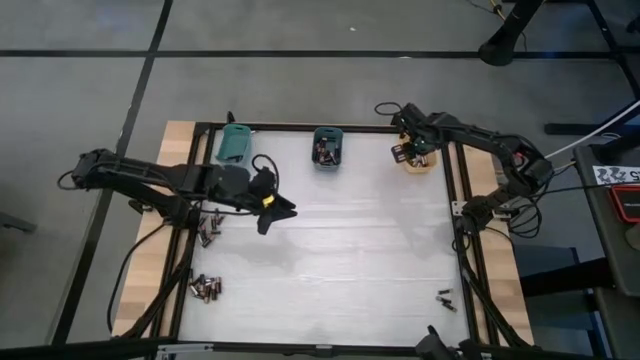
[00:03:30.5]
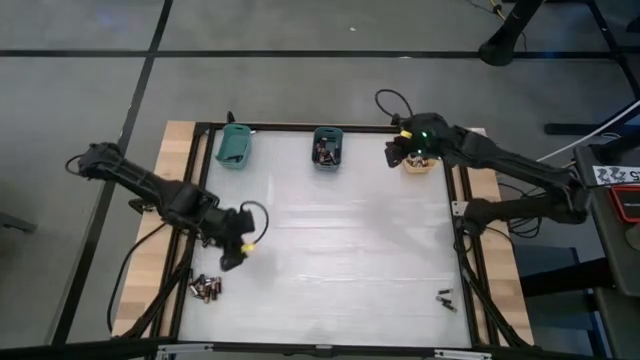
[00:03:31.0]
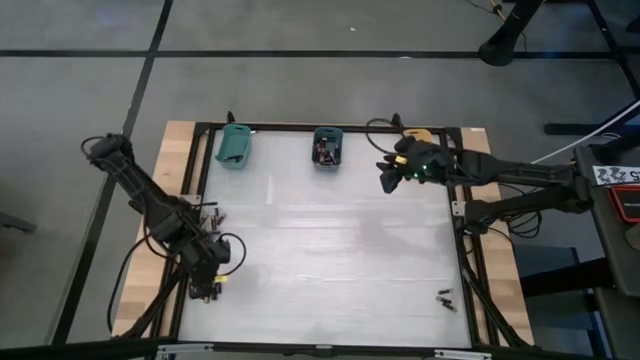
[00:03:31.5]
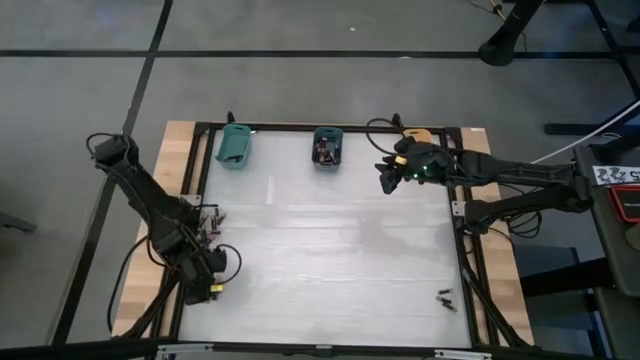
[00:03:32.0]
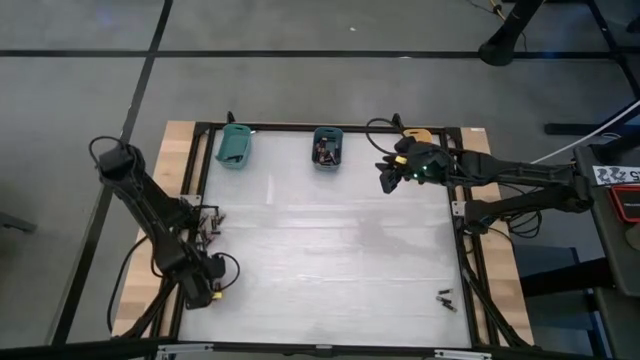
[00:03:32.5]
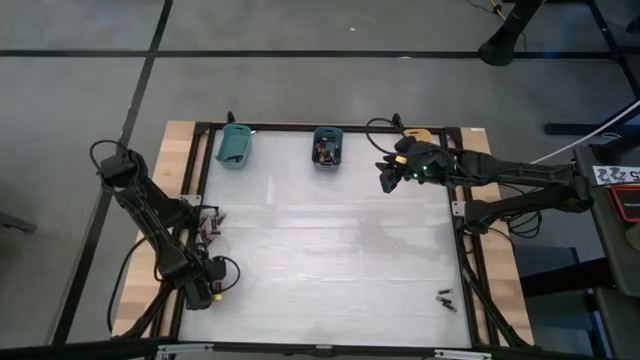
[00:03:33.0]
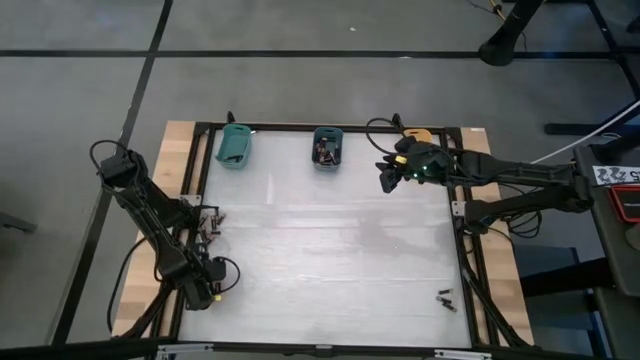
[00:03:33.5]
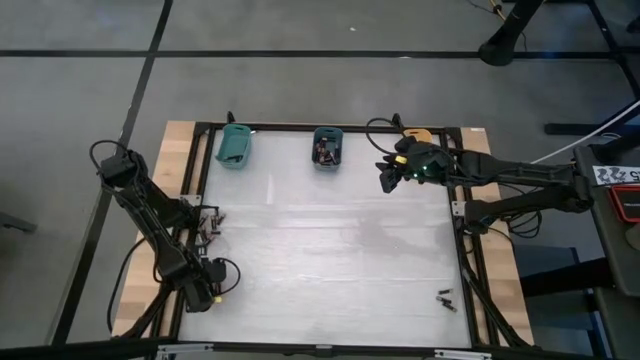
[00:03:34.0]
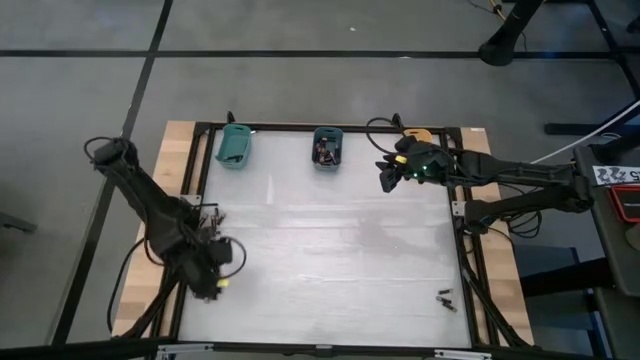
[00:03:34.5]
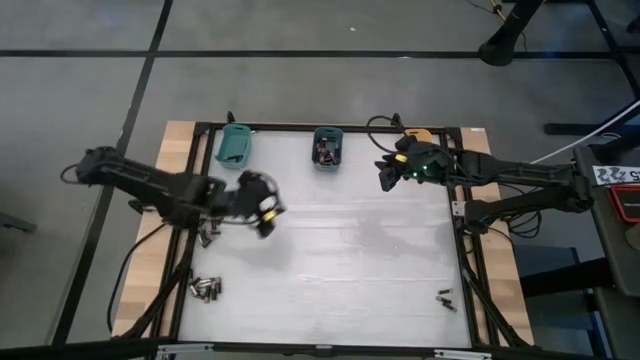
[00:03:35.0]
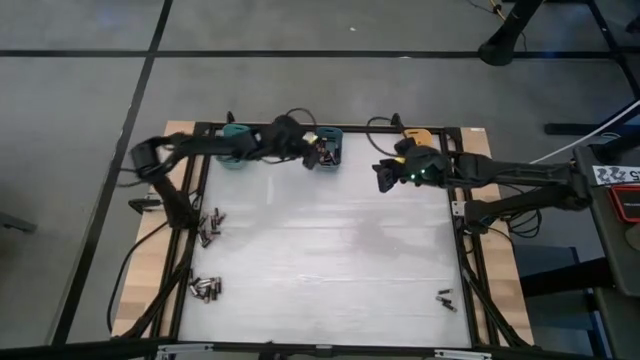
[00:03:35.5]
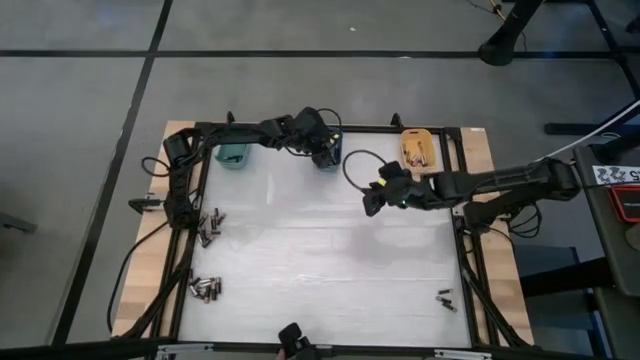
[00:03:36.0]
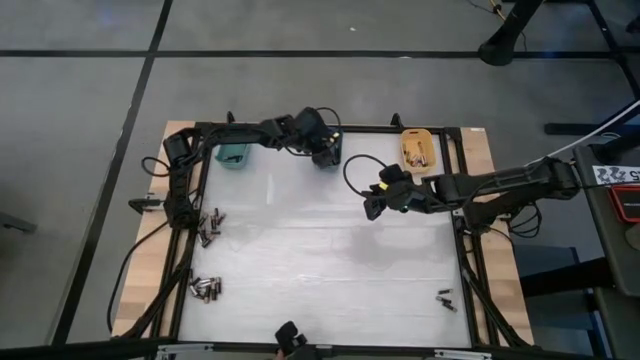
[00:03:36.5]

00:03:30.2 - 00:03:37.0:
Task: Sort batteries
Put the brown battery into the blue bin

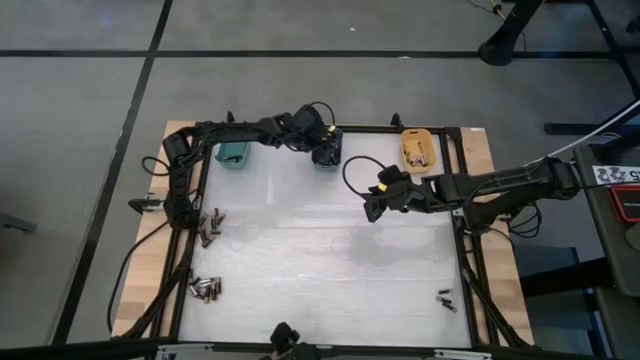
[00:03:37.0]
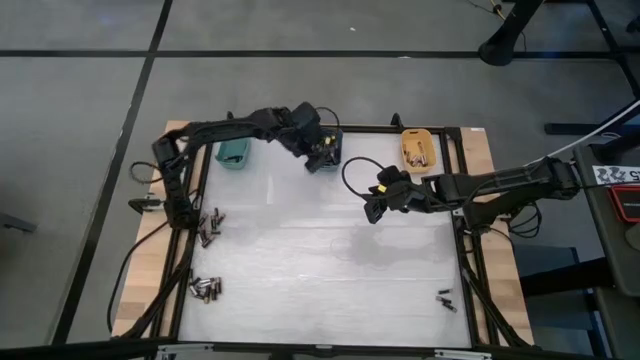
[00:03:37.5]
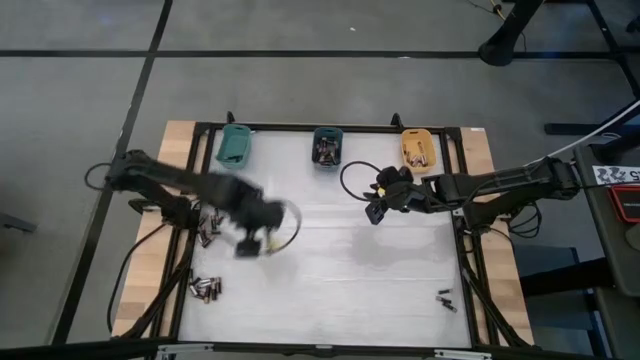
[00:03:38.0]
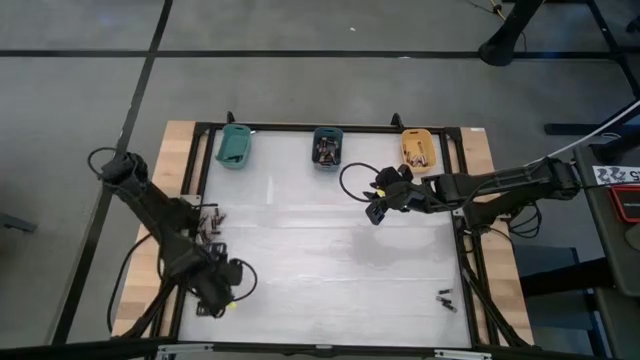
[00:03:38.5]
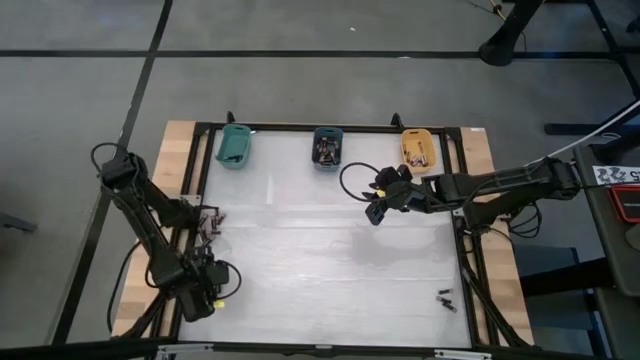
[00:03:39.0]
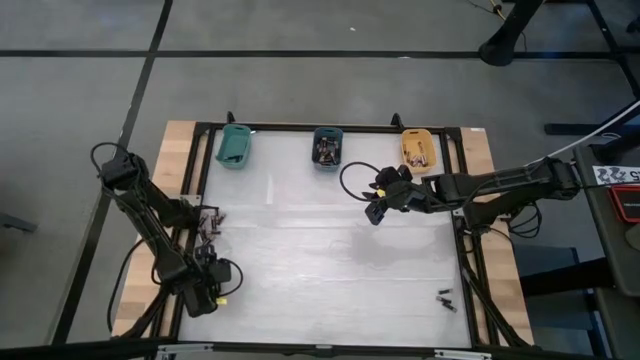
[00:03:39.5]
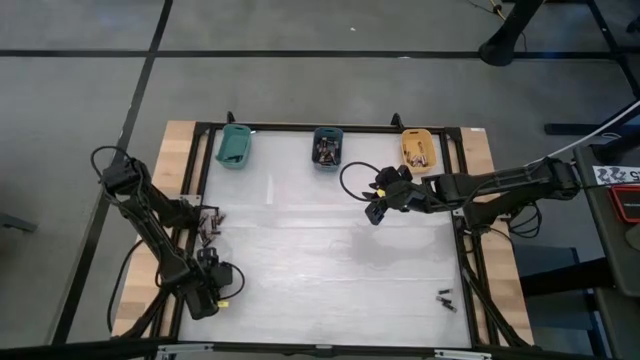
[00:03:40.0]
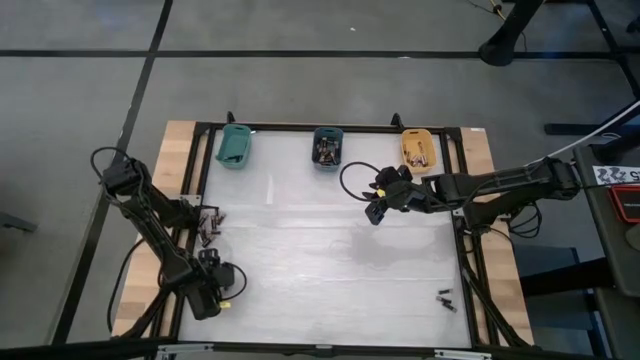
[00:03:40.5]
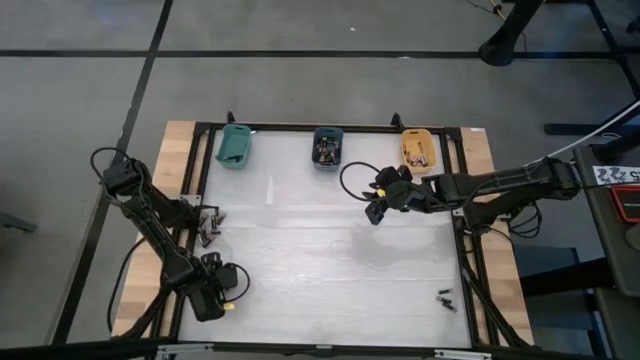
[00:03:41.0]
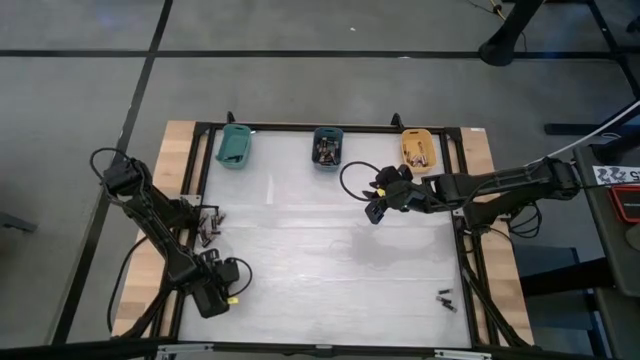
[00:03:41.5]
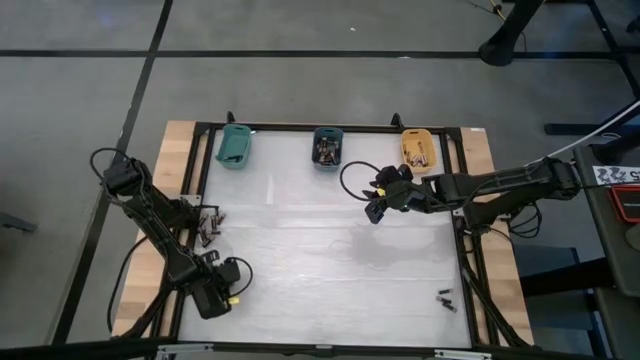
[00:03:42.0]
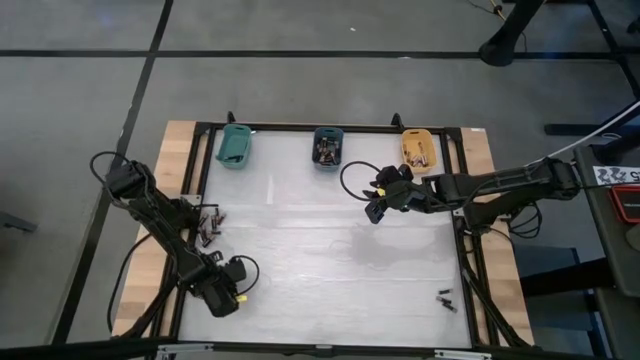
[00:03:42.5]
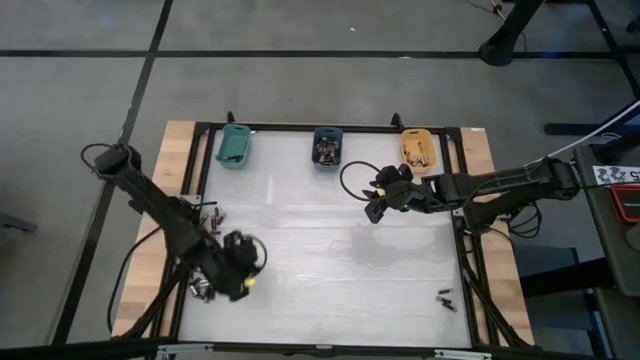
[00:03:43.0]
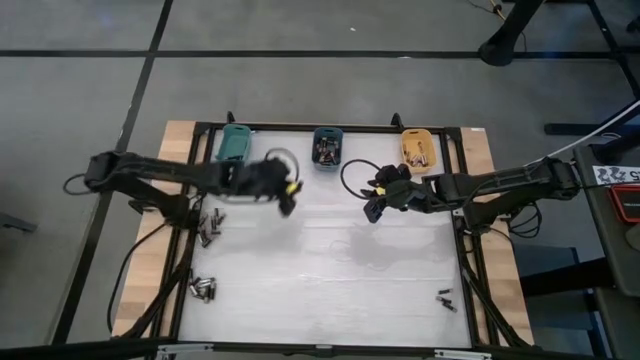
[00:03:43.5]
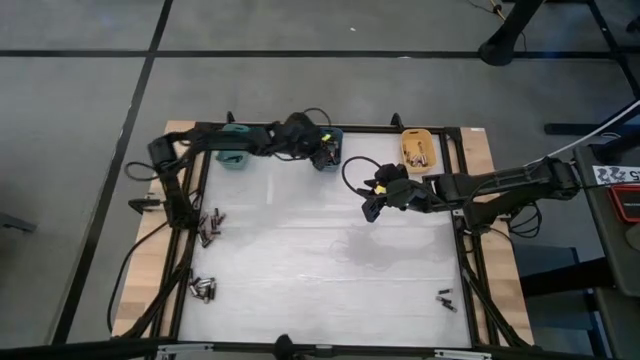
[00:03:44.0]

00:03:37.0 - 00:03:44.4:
Put the brown battery into the blue bin

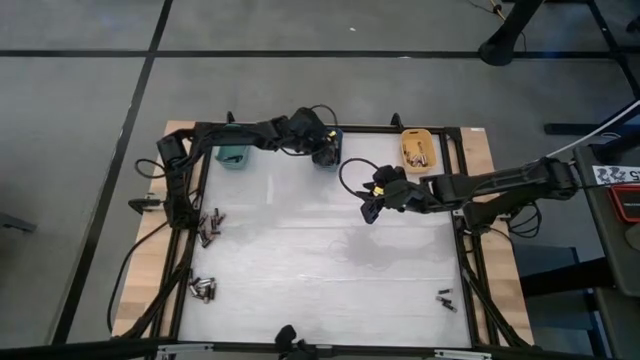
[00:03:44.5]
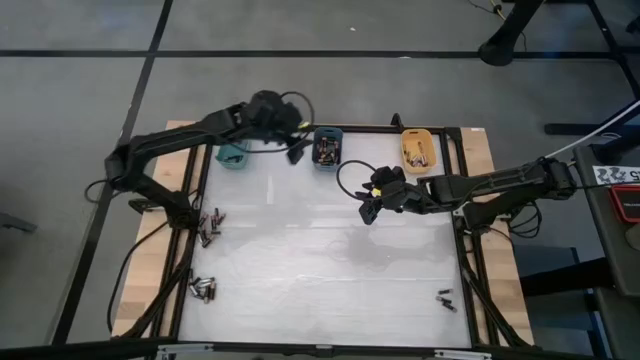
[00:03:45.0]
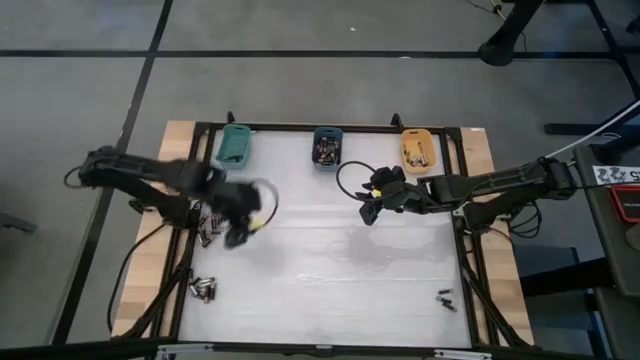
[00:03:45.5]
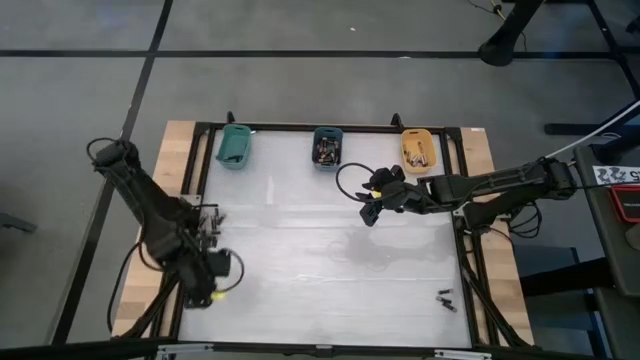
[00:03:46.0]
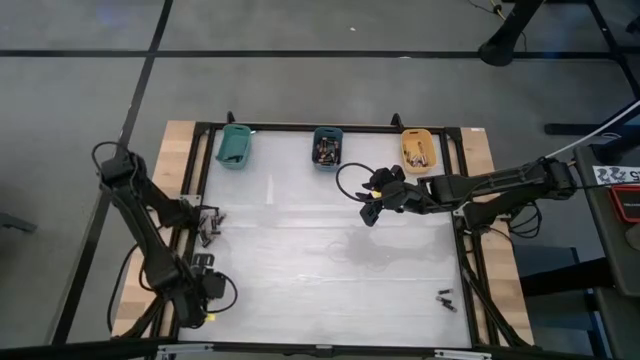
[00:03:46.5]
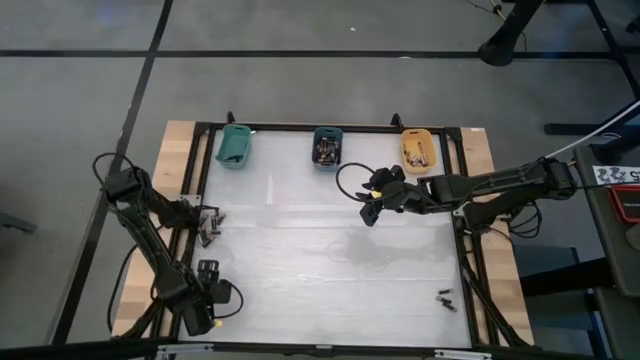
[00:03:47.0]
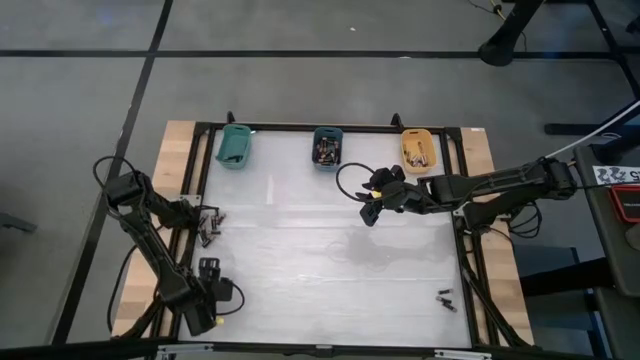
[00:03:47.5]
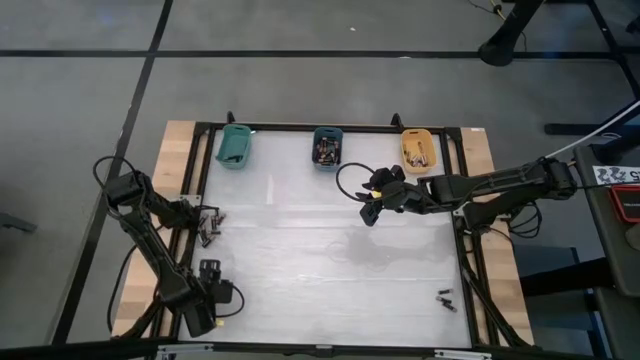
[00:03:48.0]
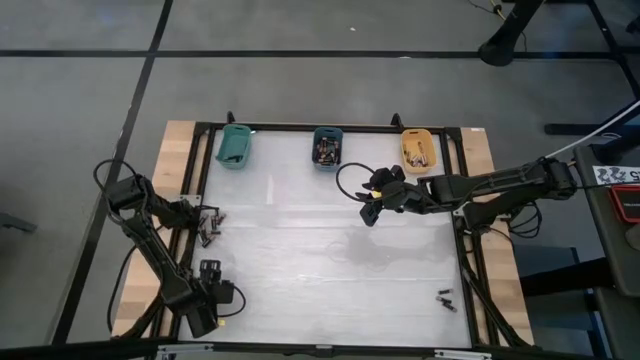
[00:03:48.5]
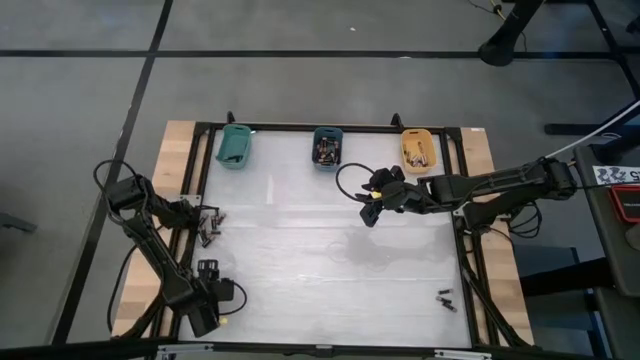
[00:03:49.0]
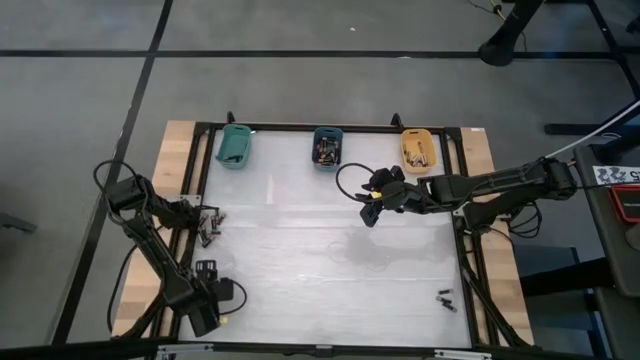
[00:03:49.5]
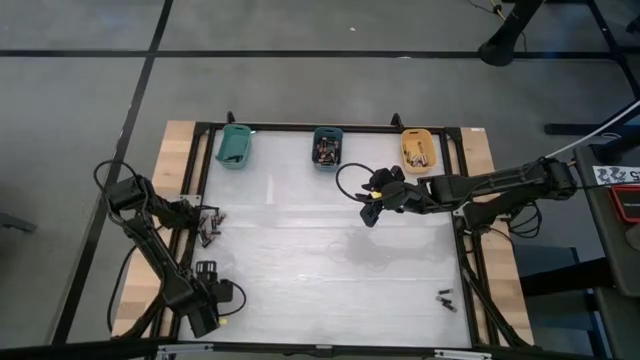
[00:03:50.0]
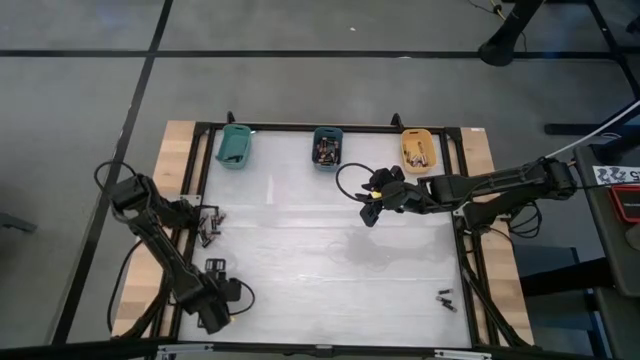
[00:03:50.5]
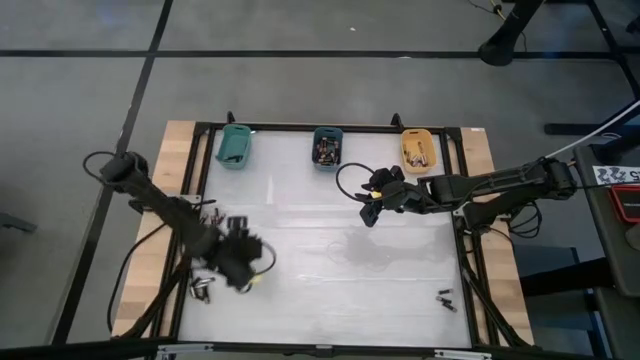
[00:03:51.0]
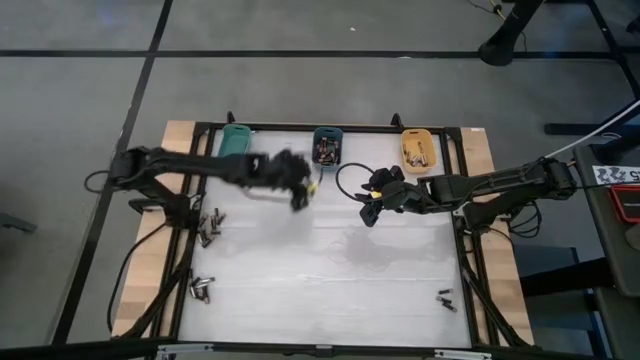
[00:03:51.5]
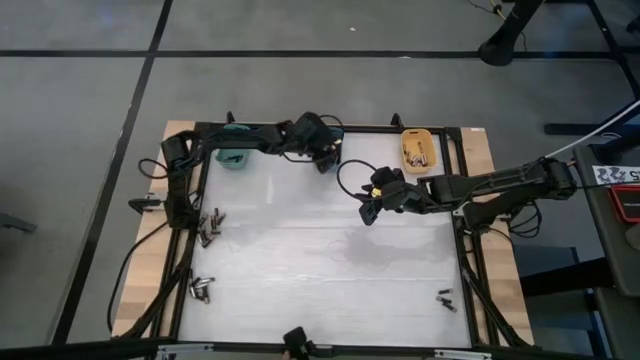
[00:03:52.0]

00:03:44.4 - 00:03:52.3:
Put the brown battery into the blue bin
